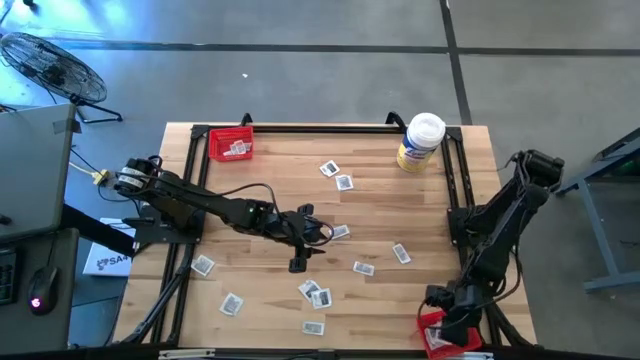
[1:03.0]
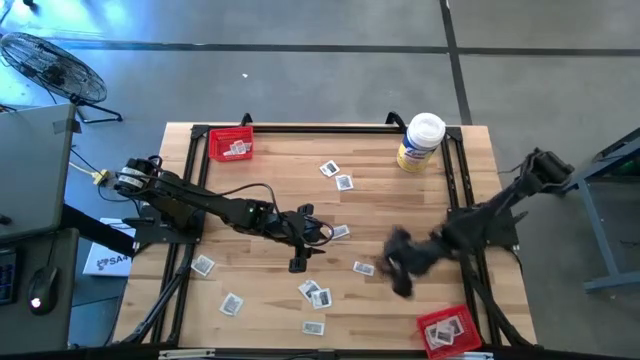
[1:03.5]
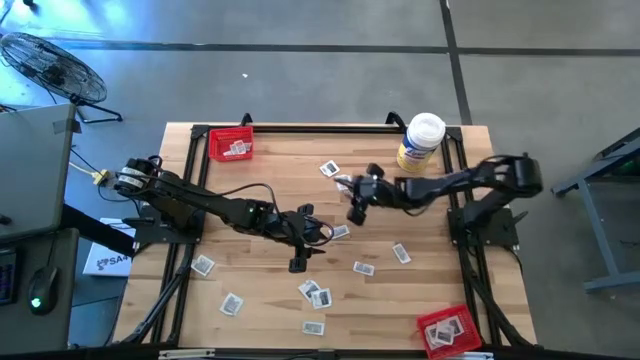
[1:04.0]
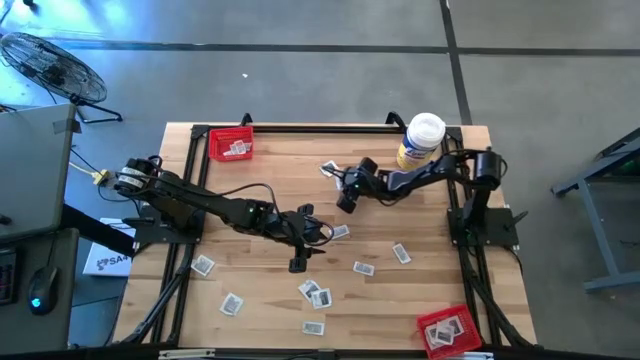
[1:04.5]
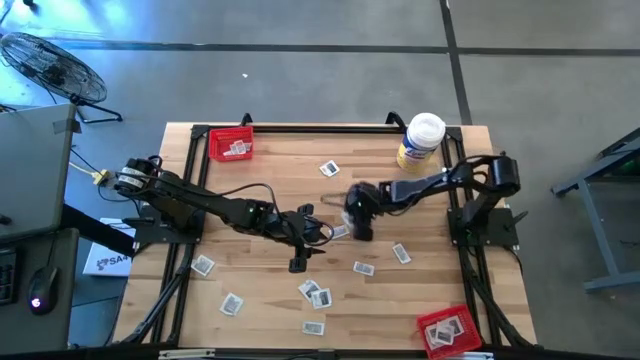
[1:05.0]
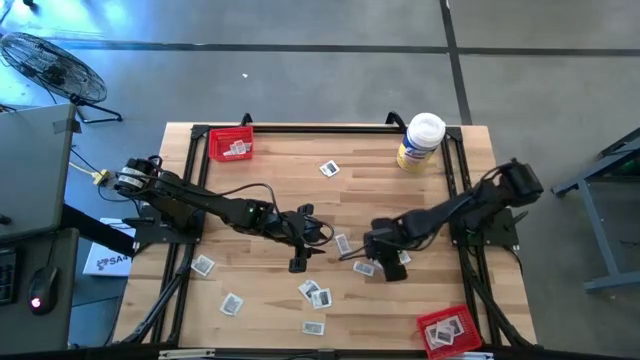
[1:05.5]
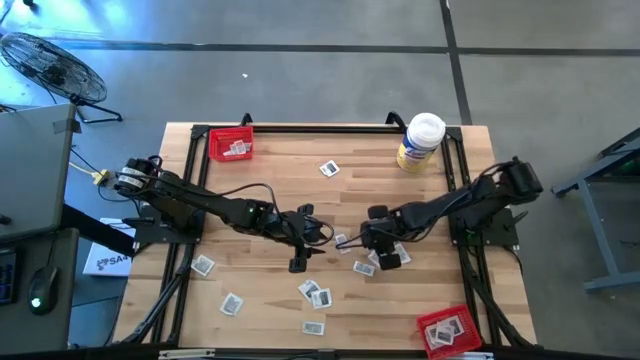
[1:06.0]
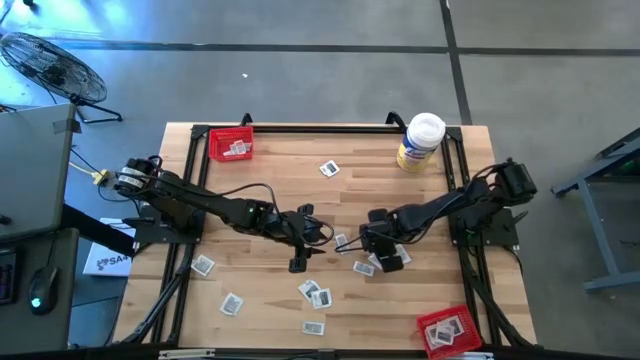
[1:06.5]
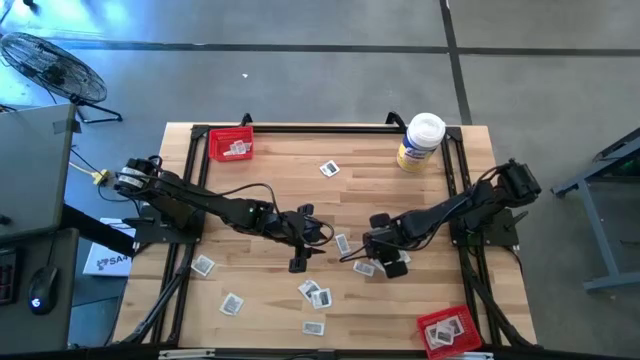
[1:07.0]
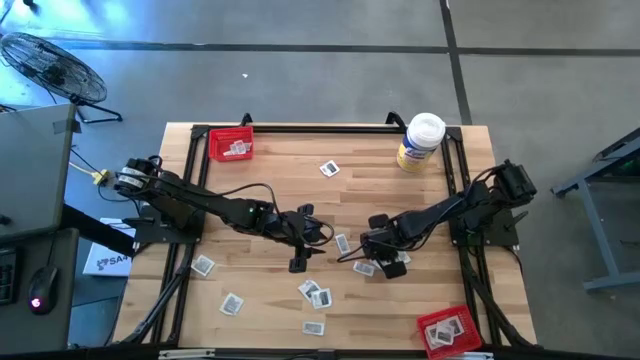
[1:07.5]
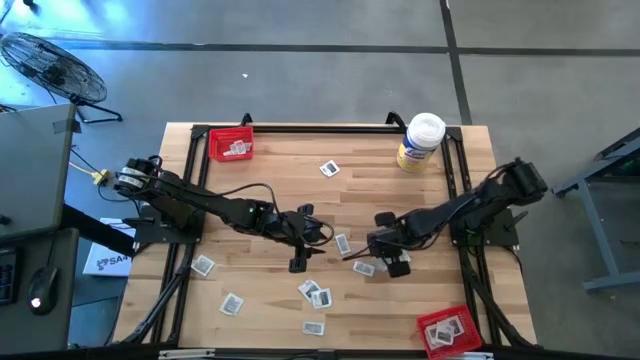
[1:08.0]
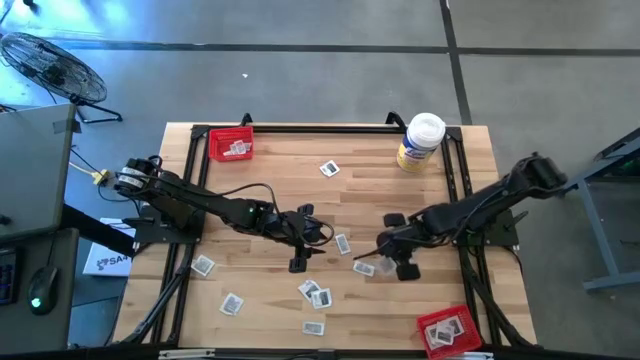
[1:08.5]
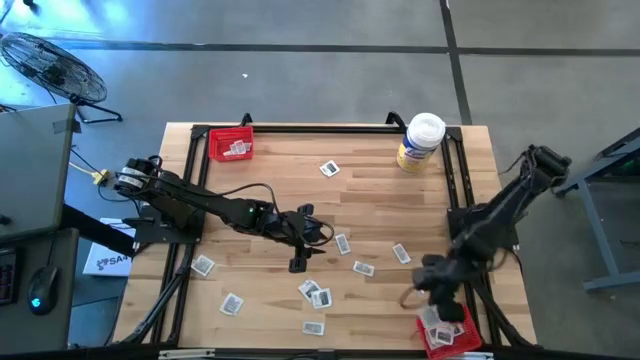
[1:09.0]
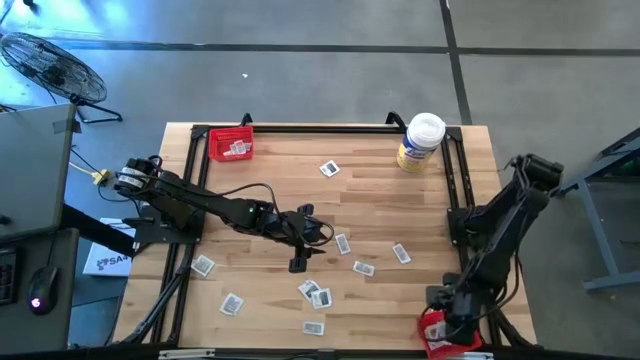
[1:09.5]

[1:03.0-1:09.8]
Task: Pick & Place First Aid Supplies
Put the white and gray towelette pack into the bottom red bin

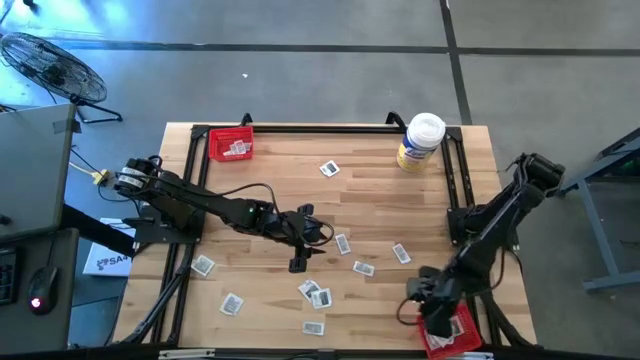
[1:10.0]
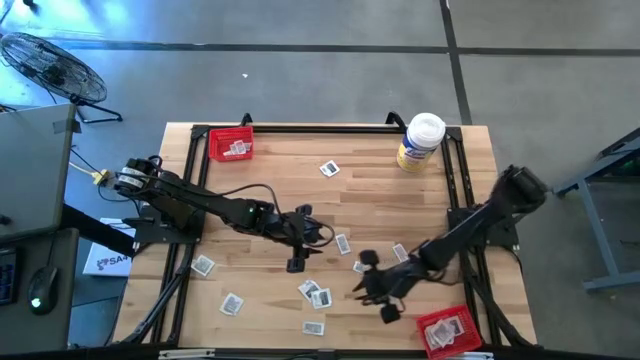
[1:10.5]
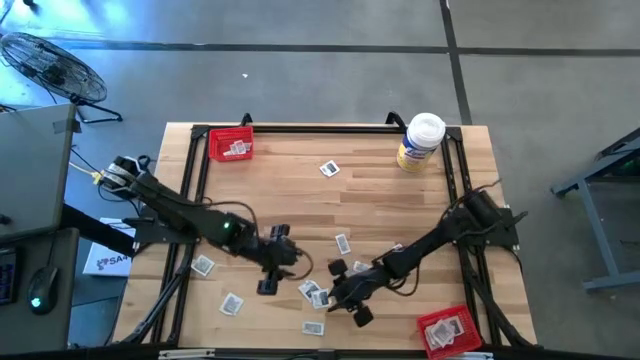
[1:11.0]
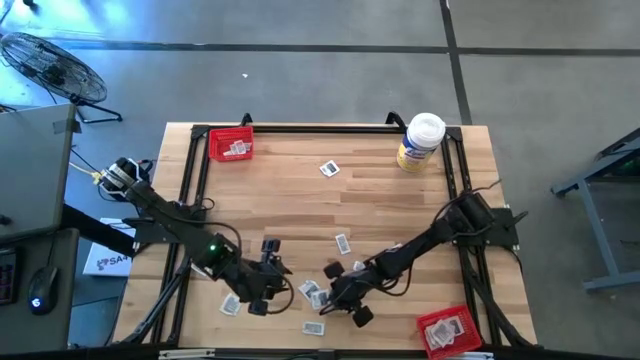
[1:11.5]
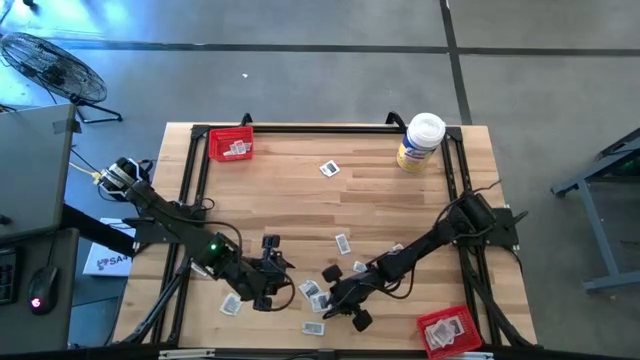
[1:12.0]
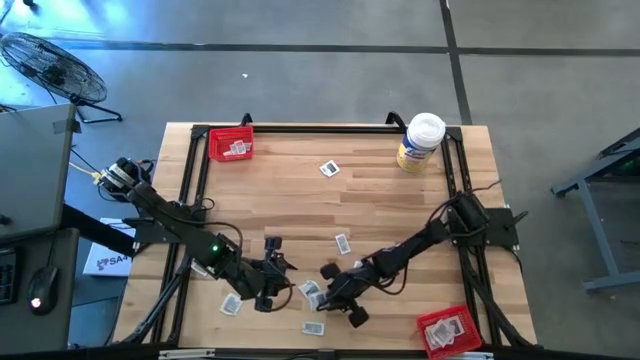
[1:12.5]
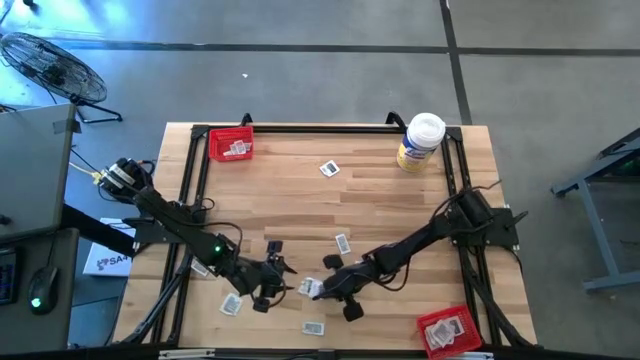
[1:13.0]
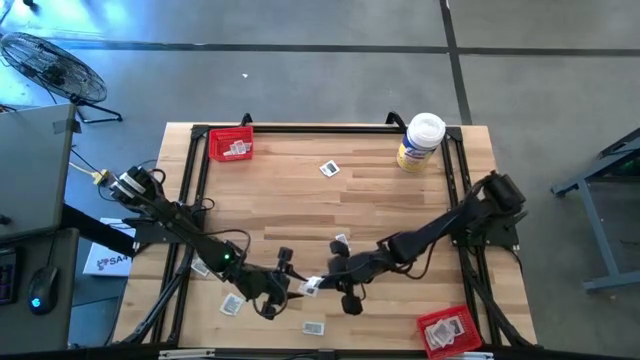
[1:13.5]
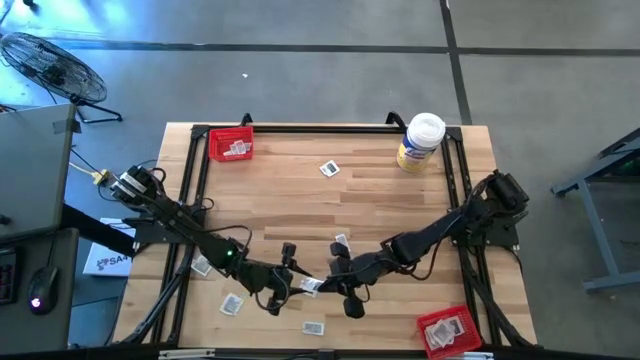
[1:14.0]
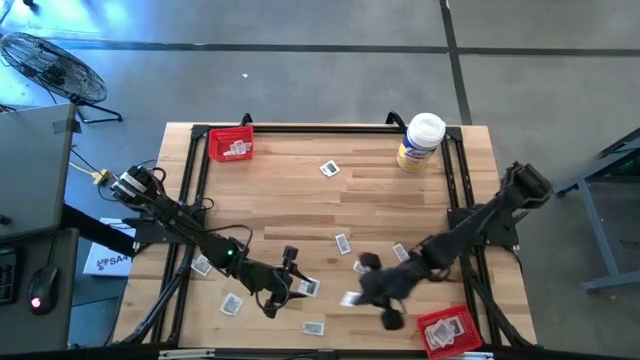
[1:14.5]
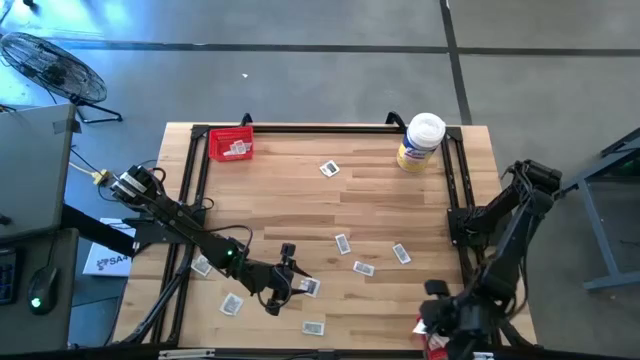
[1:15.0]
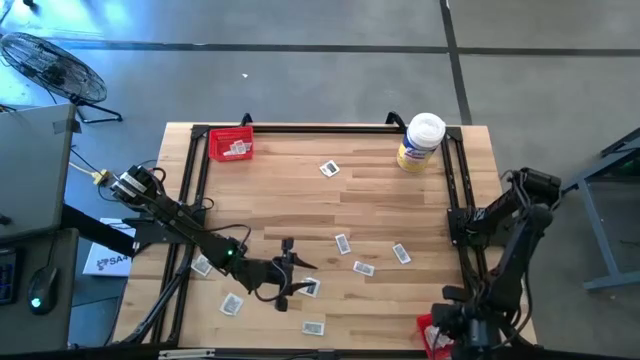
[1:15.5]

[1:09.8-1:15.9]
Put the white and gray towelette pack into the bottom red bin

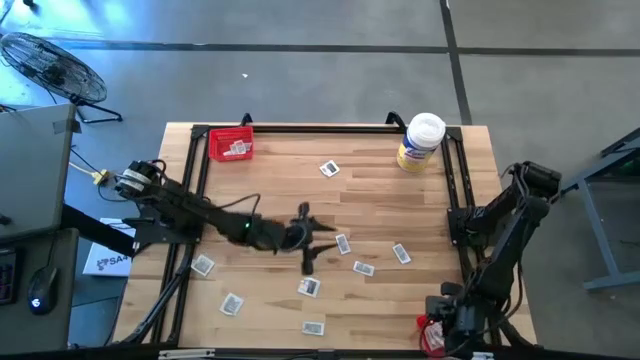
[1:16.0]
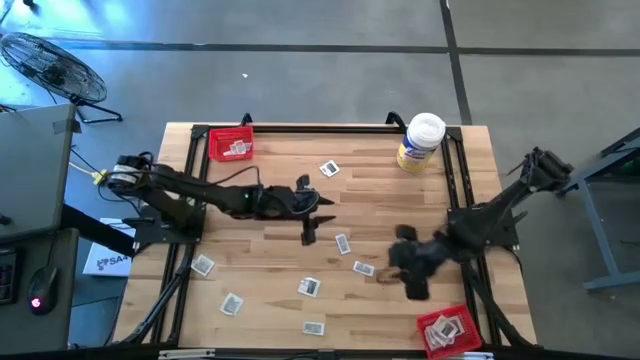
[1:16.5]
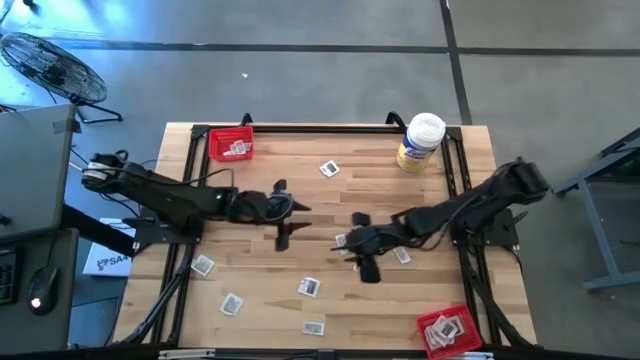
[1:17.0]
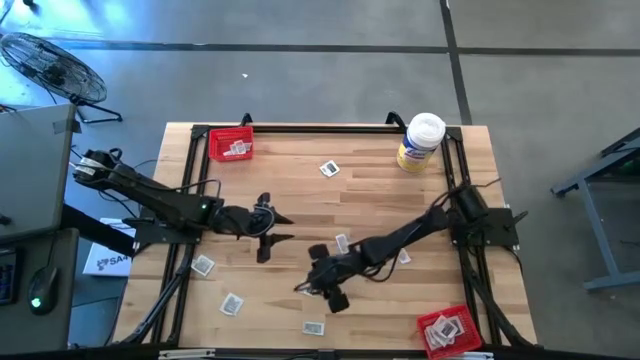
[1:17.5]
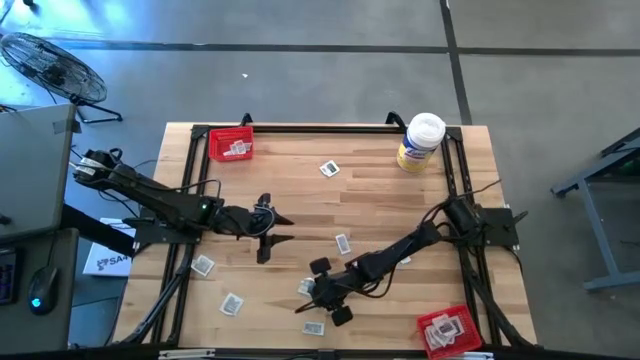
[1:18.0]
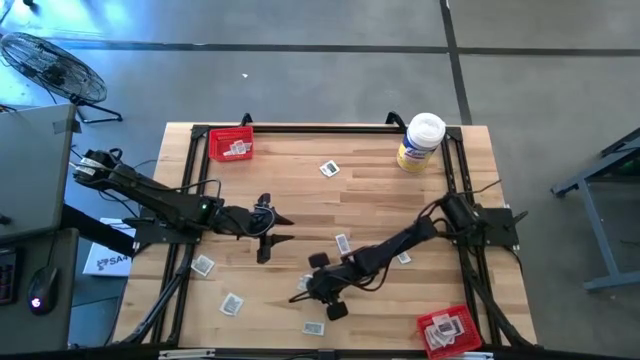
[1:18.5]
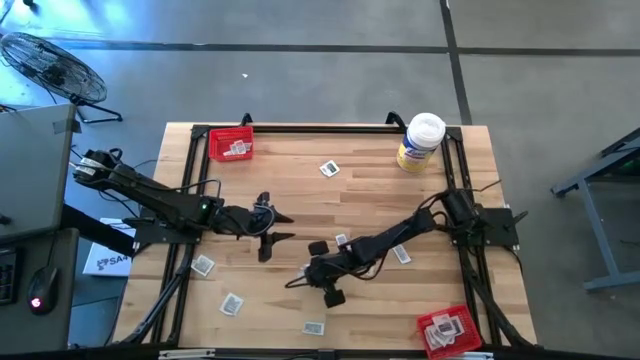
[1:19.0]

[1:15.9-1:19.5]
Put the white and gray towelette pack into the bottom red bin

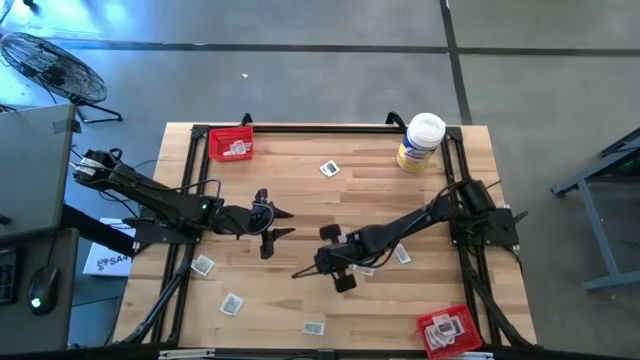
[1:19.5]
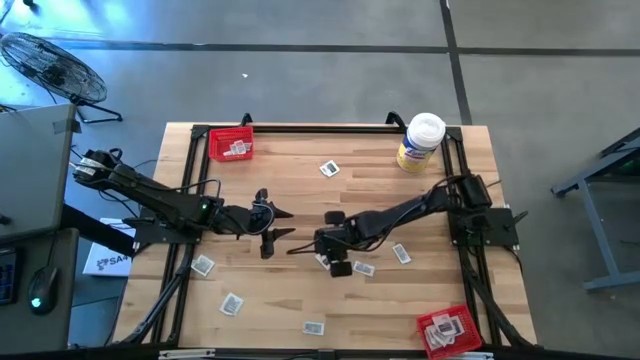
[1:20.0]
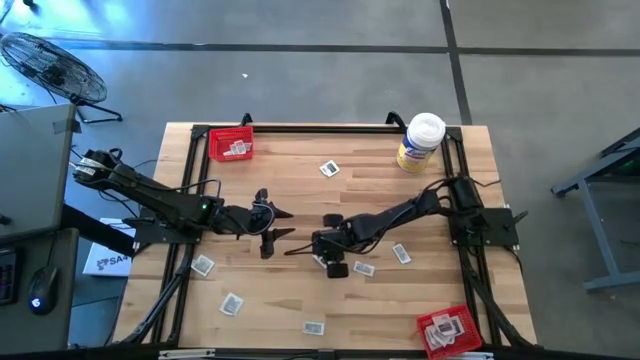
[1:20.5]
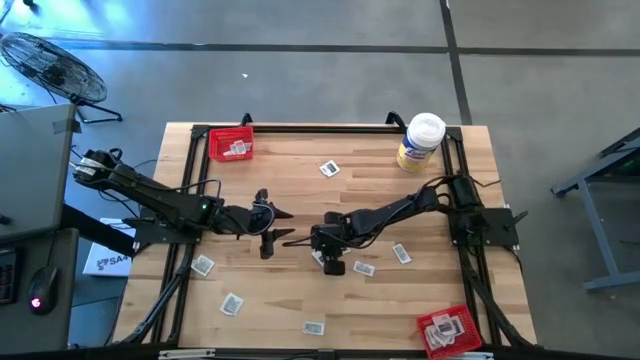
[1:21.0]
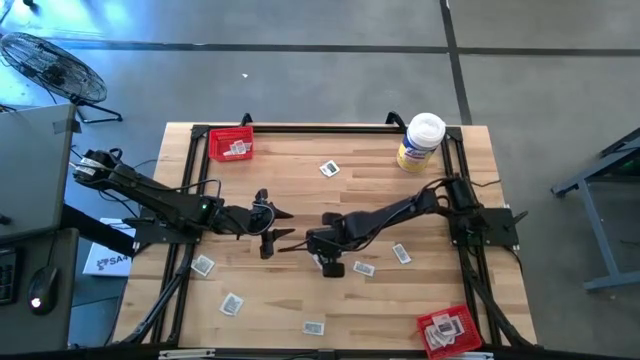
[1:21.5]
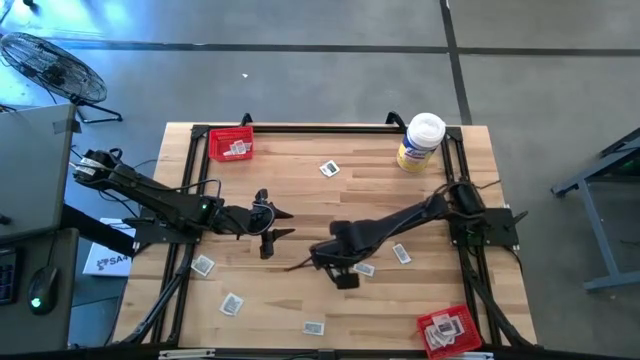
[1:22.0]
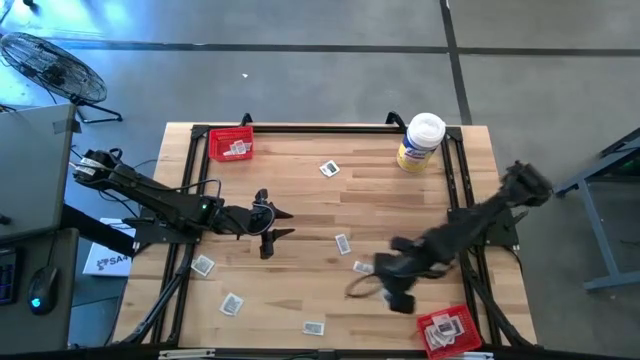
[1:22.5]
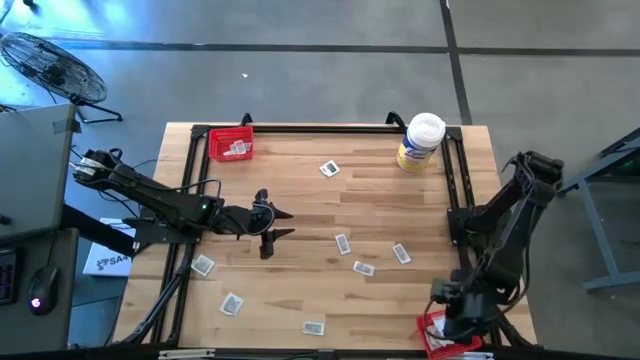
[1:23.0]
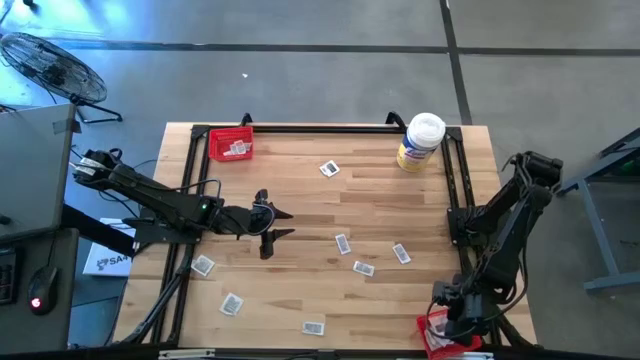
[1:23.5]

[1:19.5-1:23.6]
Put the white and gray towelette pack into the bottom red bin
